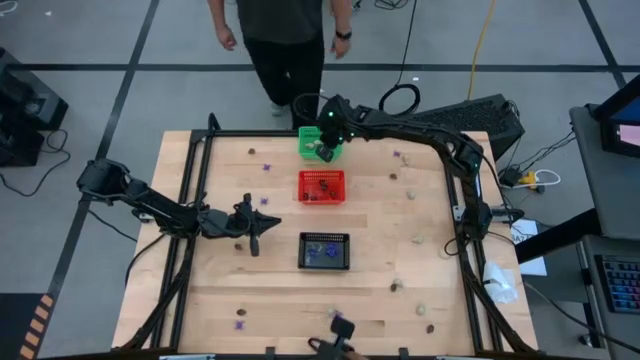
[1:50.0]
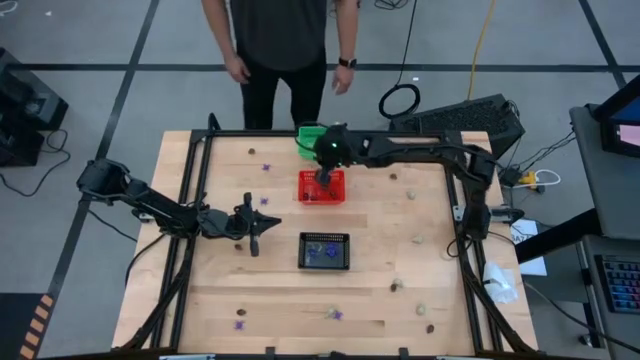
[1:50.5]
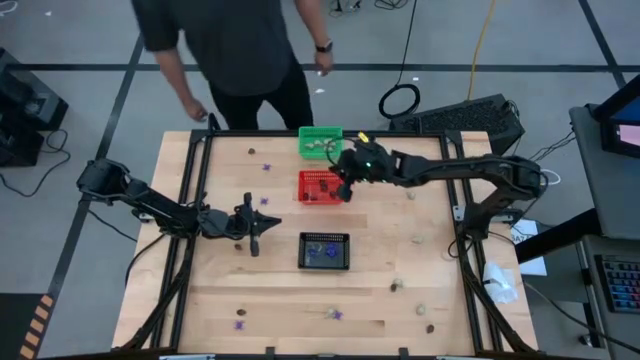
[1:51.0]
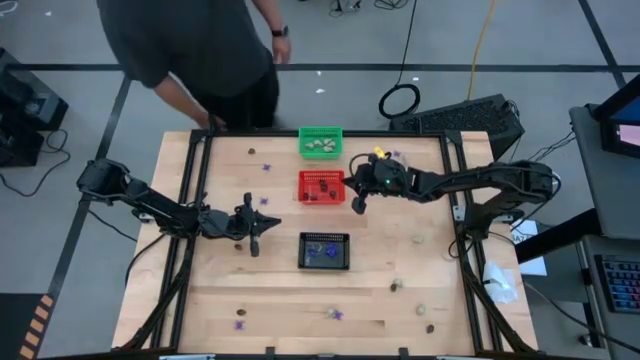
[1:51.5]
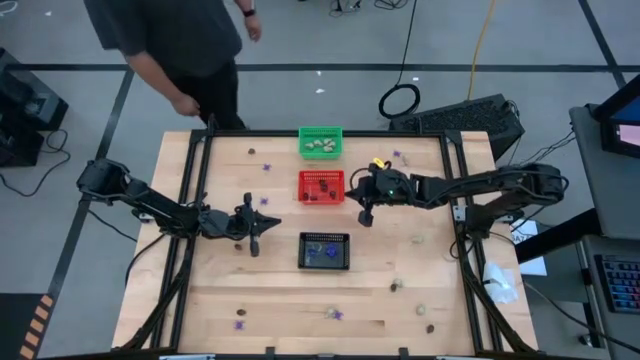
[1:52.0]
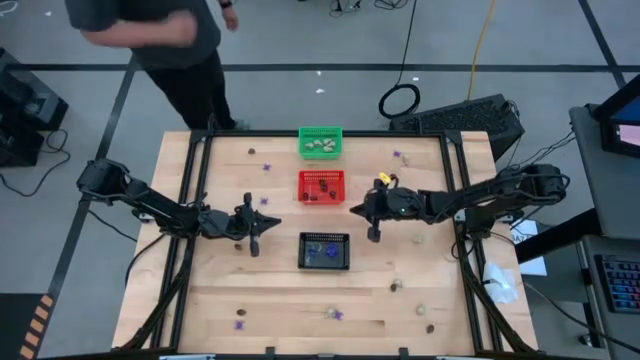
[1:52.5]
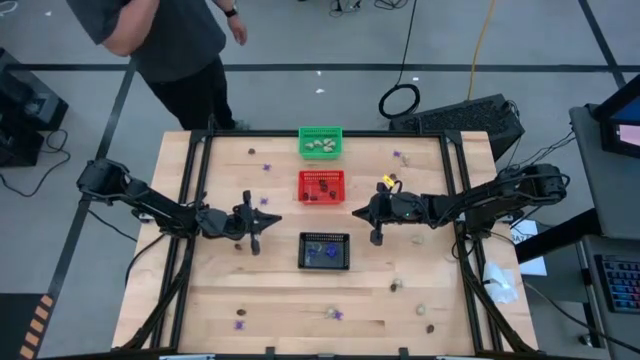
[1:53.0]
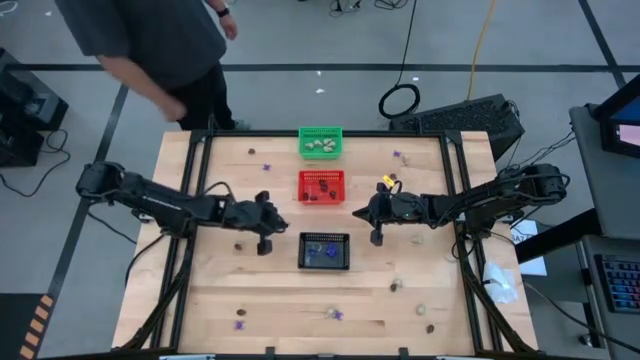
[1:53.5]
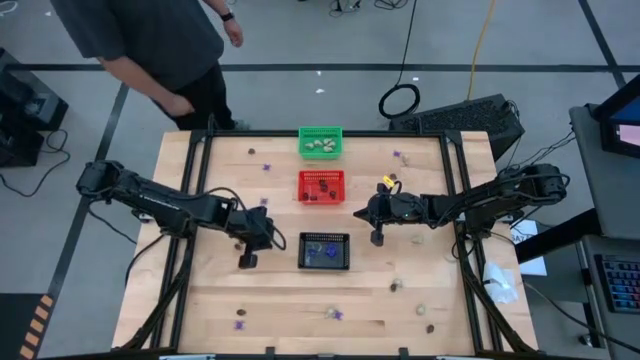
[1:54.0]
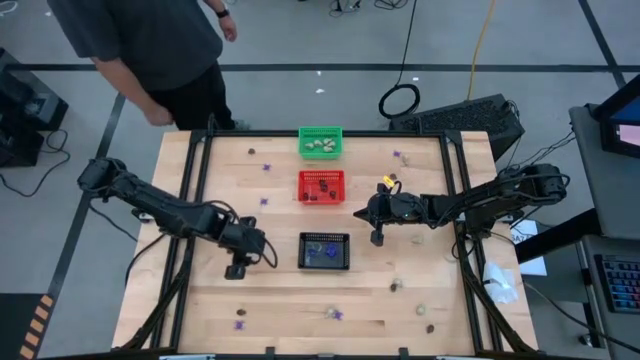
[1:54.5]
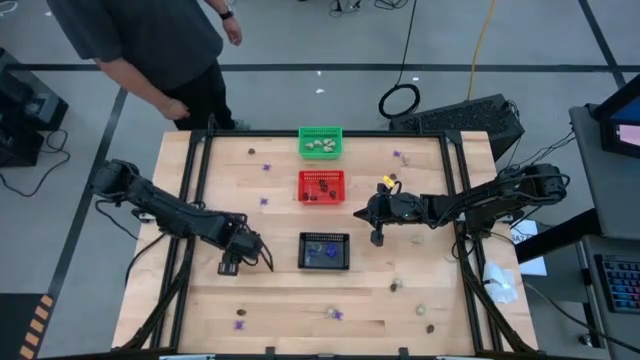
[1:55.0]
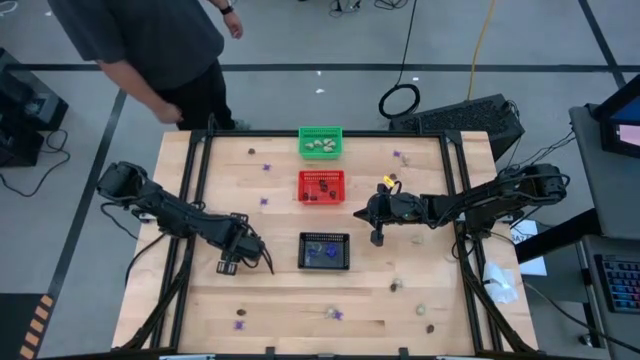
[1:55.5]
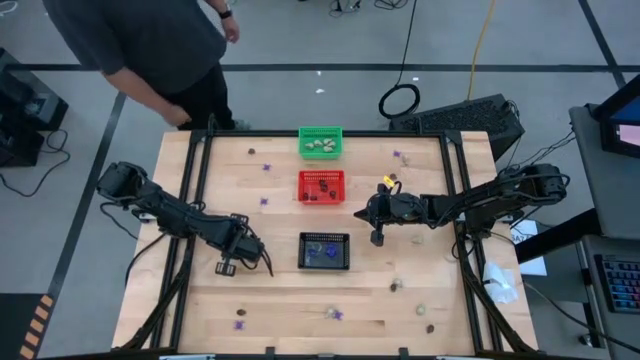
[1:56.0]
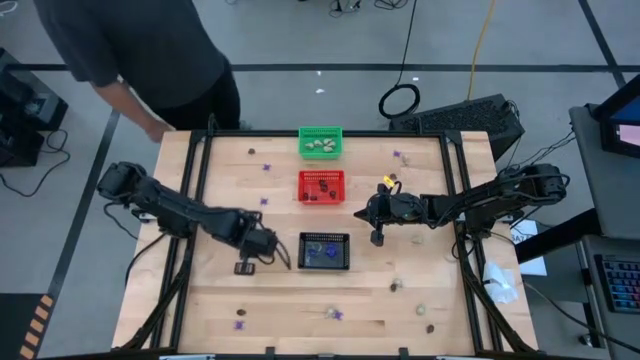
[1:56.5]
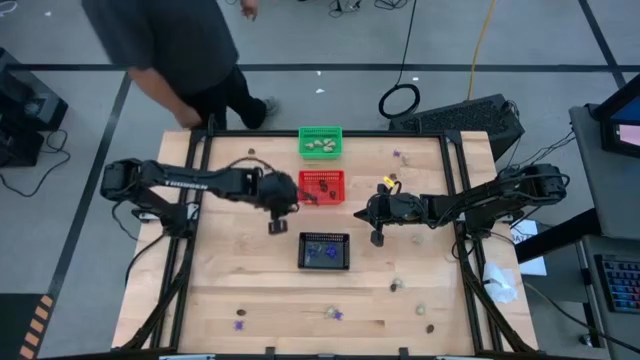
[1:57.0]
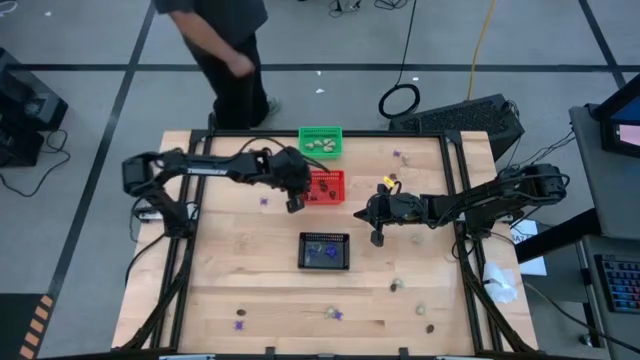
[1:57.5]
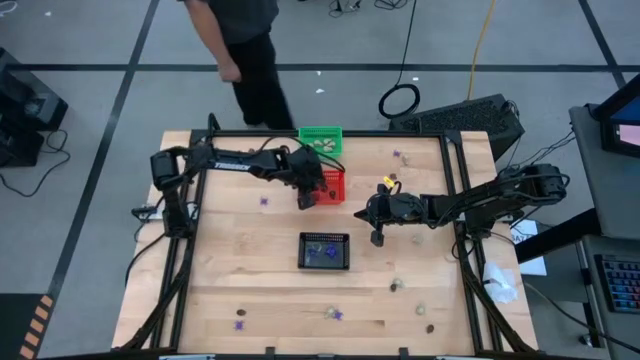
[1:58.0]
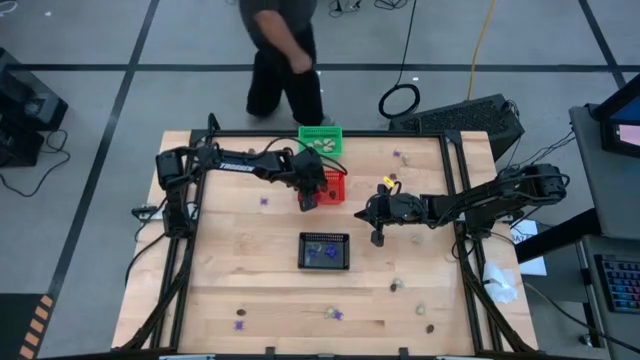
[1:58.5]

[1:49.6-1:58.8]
Task: Sort Halloween decoration
Put the black skull toy into the red basket

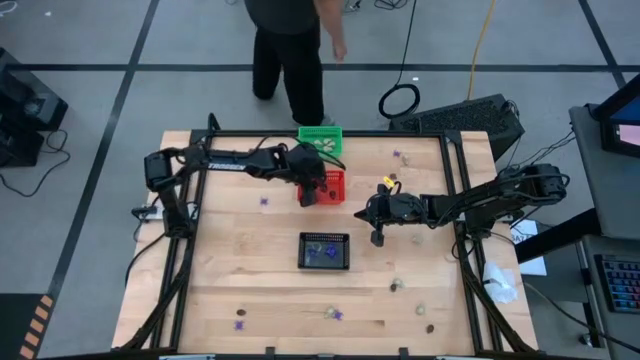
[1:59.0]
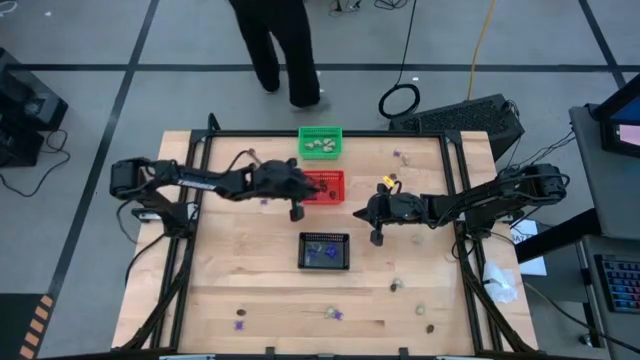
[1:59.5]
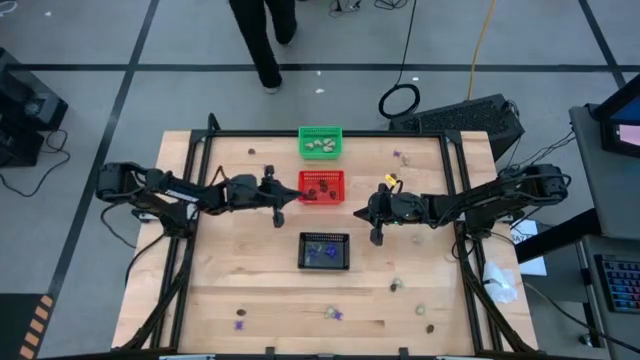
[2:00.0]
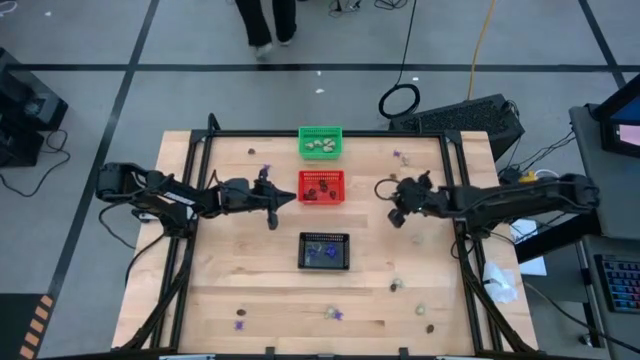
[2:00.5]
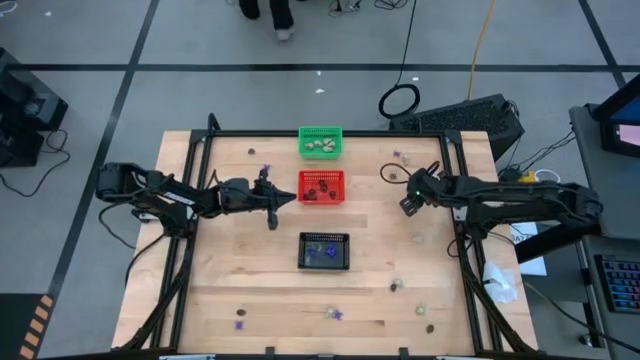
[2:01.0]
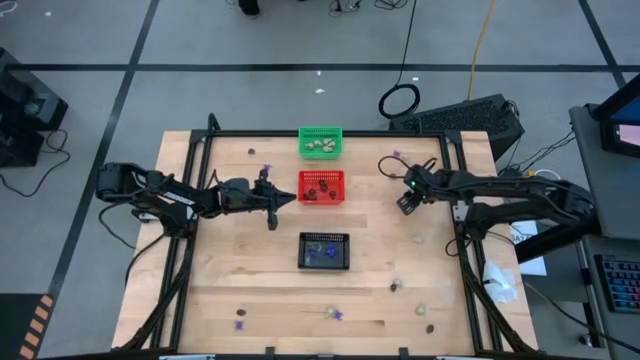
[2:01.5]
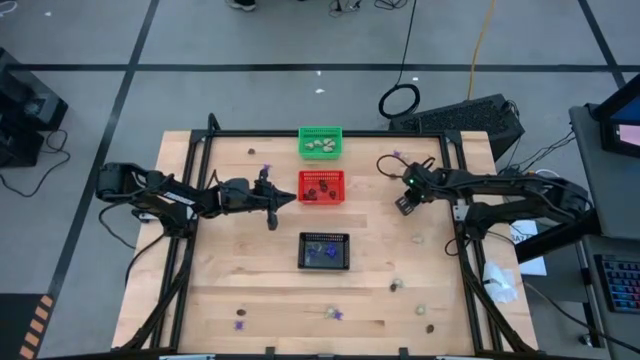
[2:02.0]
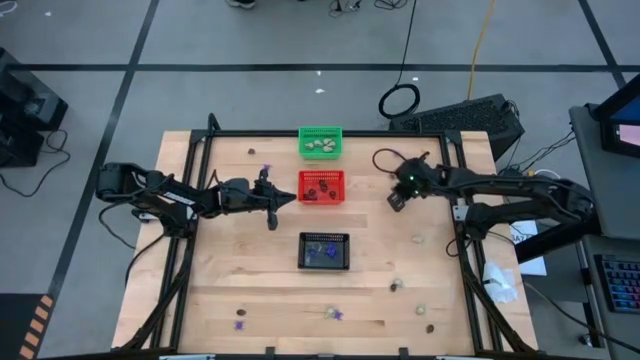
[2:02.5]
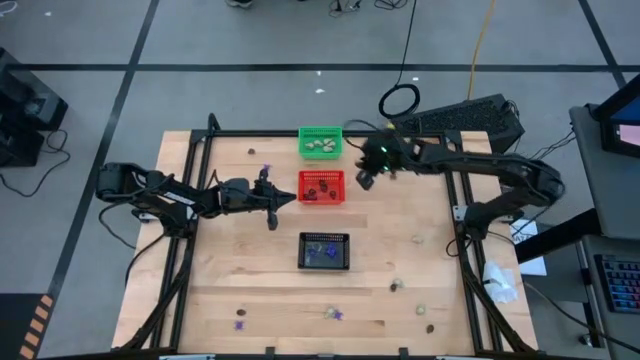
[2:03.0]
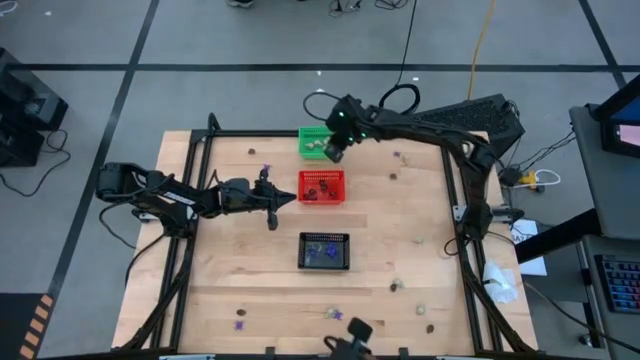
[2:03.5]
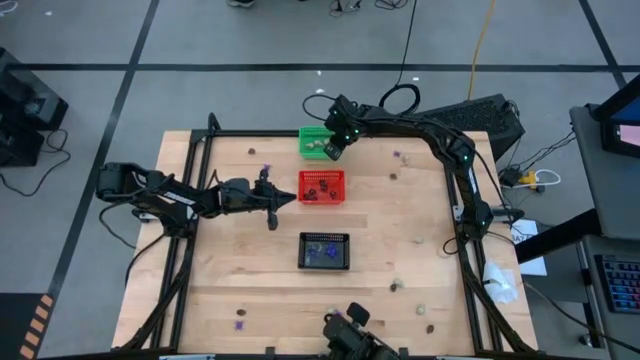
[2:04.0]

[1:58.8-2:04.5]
Put the white skull toy into the green basket

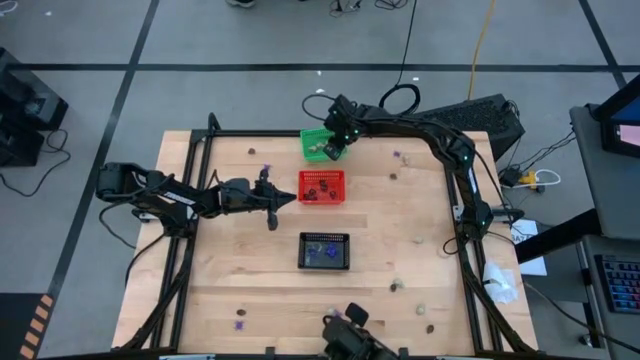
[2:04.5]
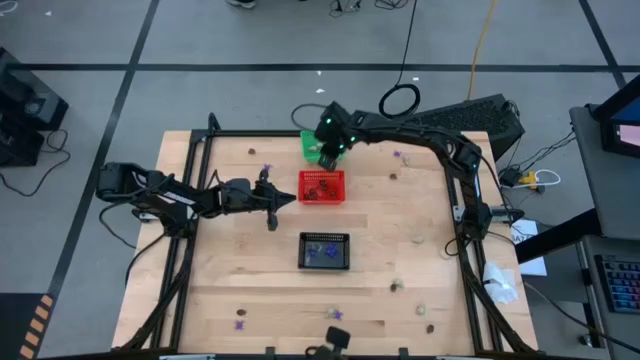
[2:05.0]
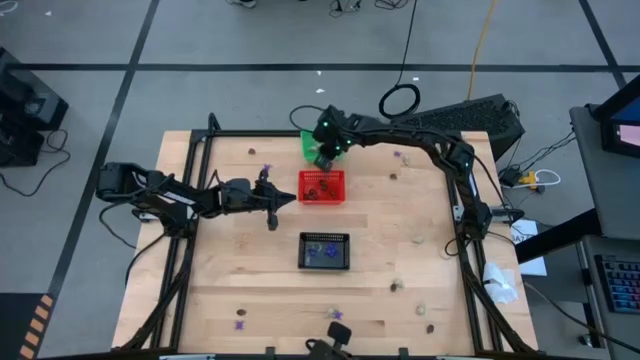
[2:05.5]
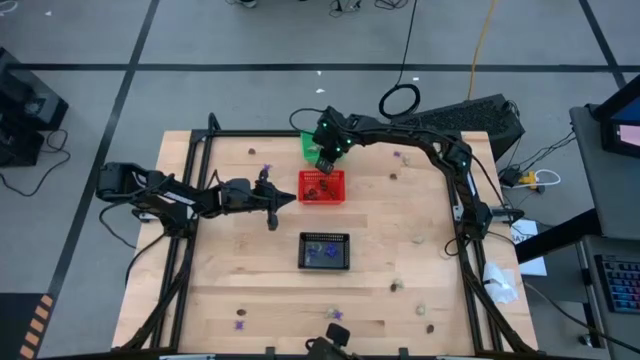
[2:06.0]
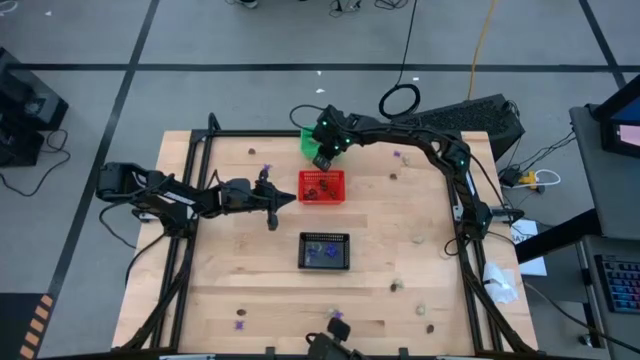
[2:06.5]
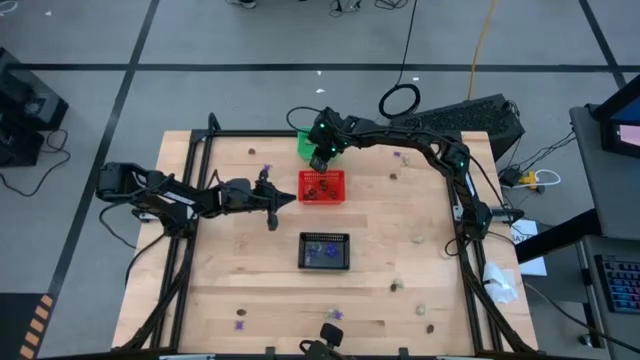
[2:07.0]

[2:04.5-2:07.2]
Adjust the green basket

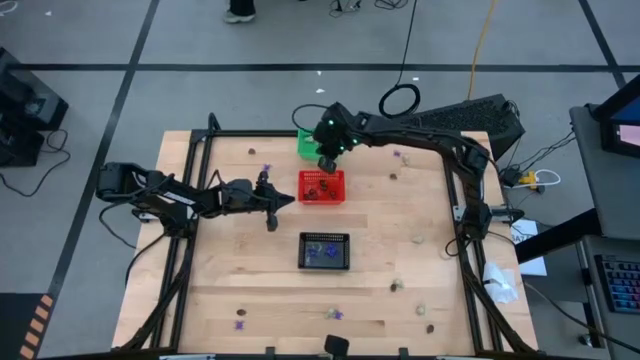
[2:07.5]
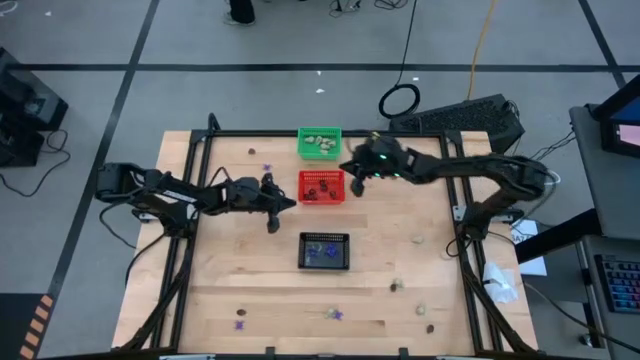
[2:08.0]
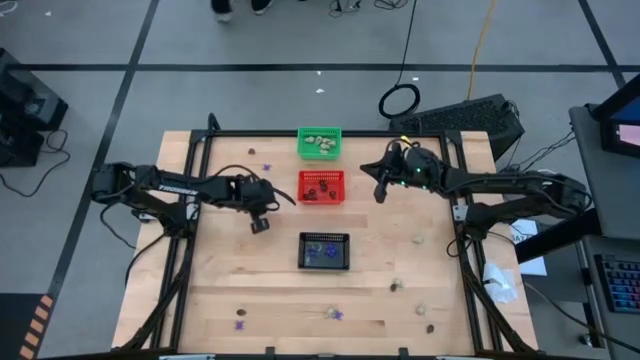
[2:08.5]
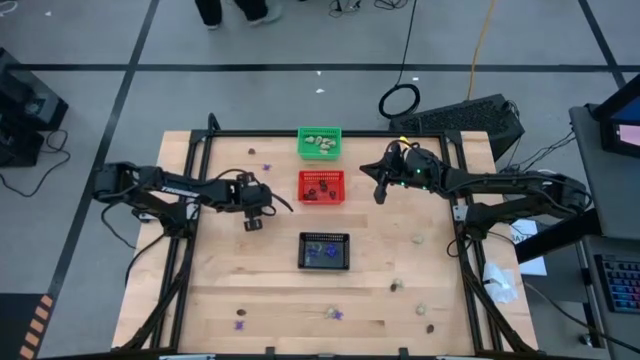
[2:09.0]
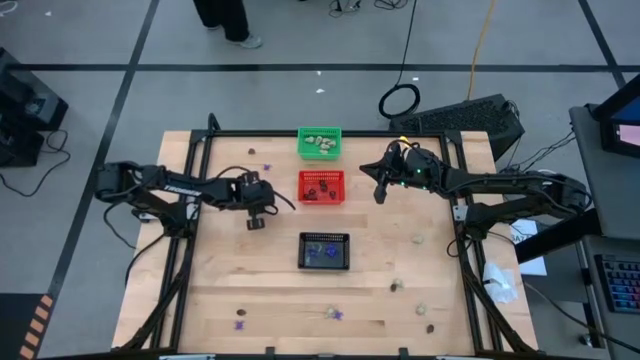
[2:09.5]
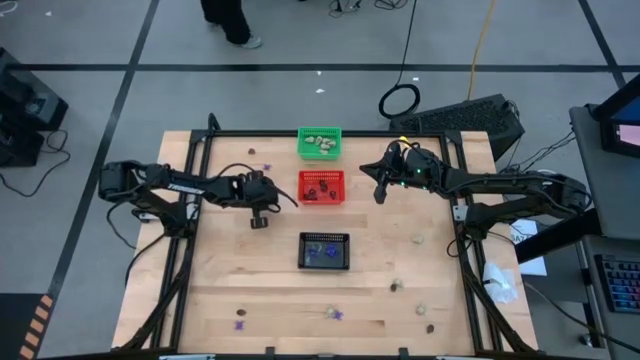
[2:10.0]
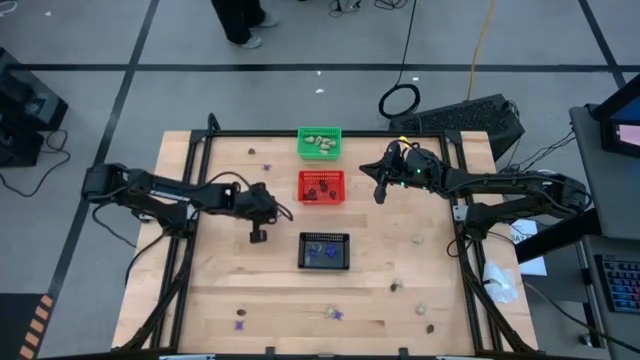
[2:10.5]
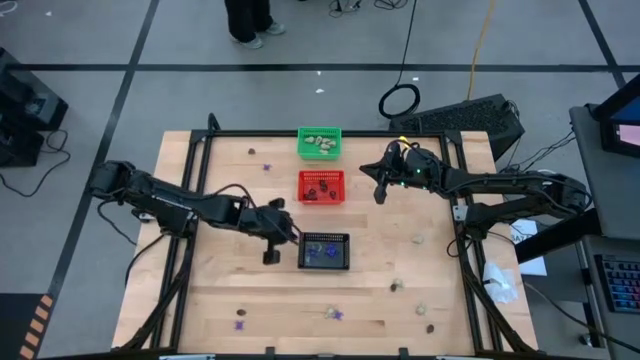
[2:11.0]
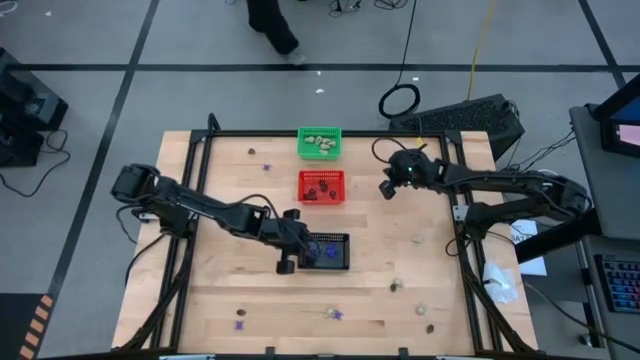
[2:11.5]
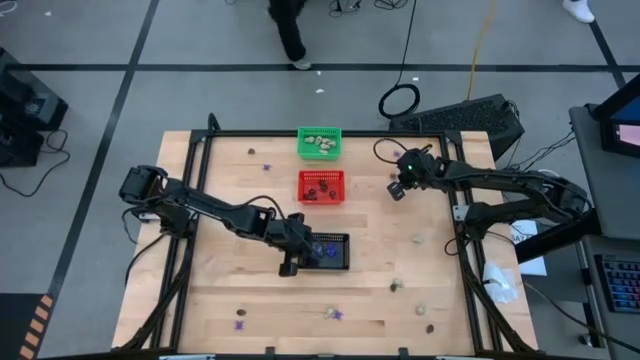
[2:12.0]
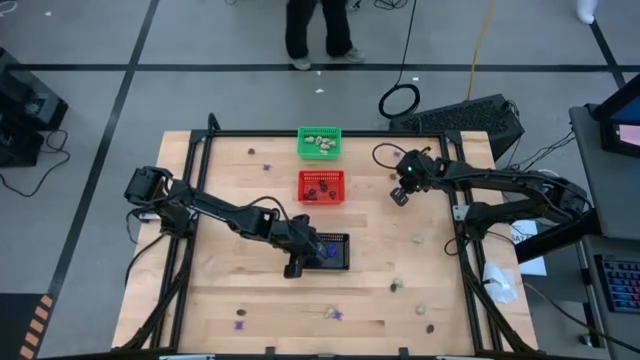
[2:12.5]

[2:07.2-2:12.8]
Put the violet spider toy into the black basket
